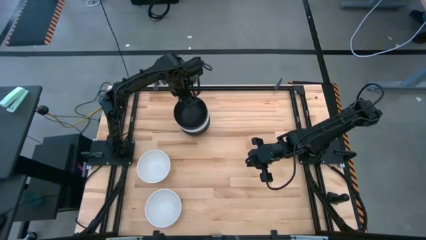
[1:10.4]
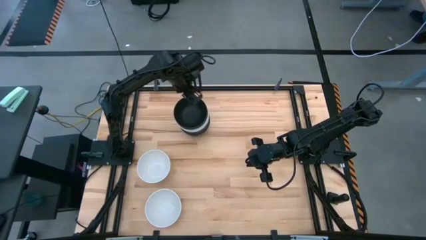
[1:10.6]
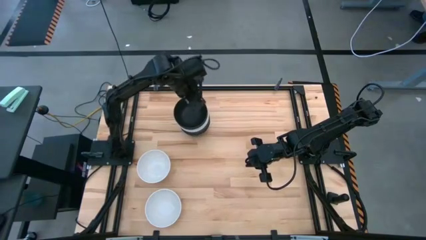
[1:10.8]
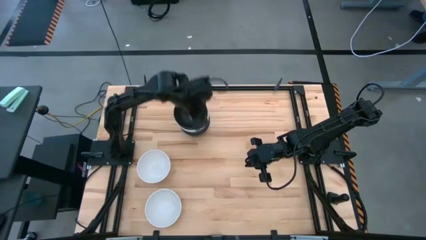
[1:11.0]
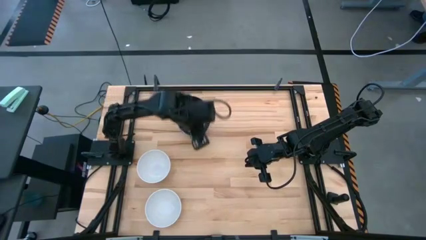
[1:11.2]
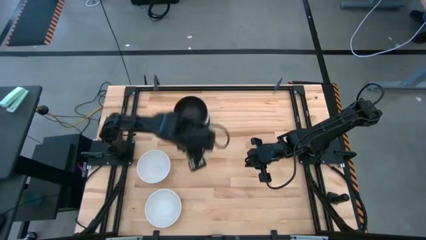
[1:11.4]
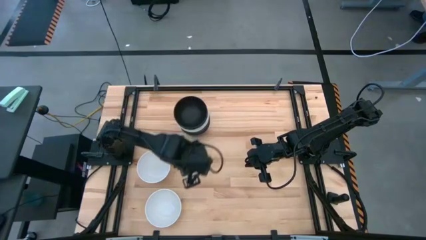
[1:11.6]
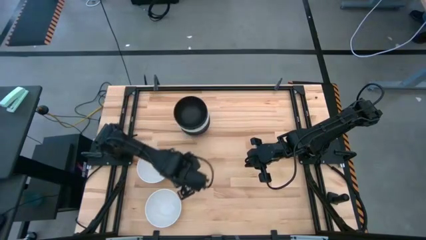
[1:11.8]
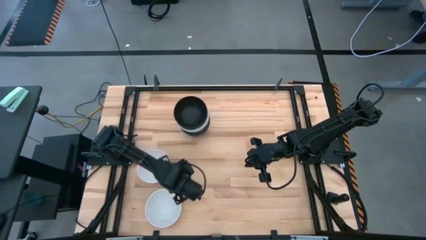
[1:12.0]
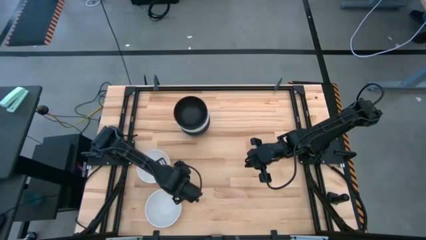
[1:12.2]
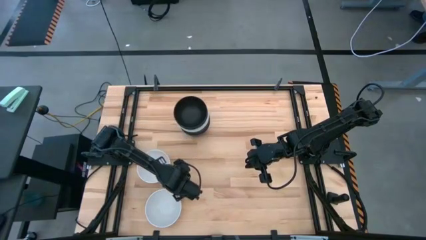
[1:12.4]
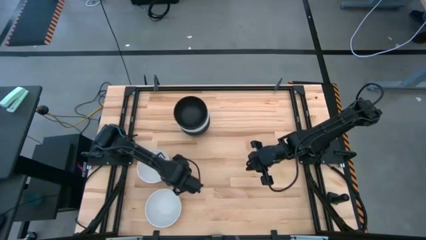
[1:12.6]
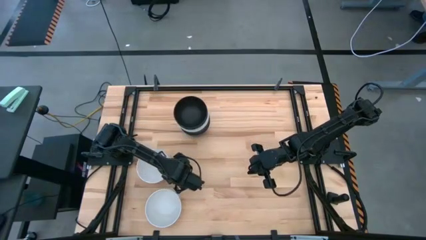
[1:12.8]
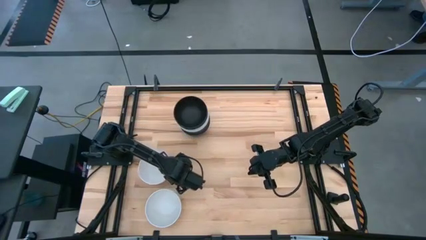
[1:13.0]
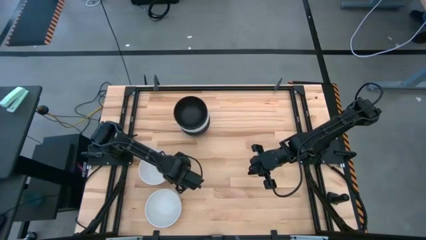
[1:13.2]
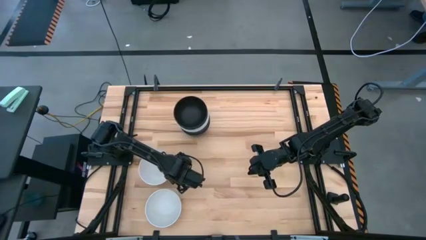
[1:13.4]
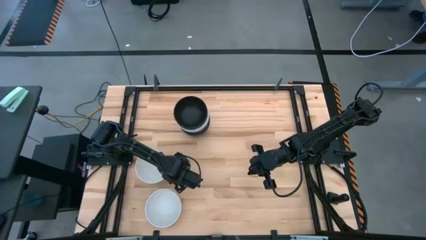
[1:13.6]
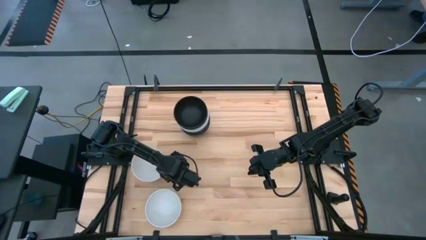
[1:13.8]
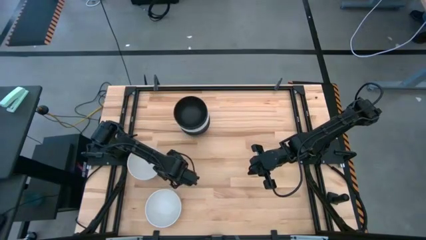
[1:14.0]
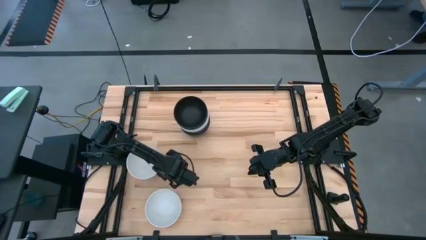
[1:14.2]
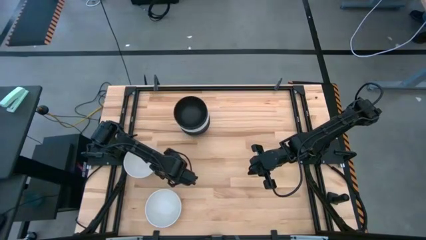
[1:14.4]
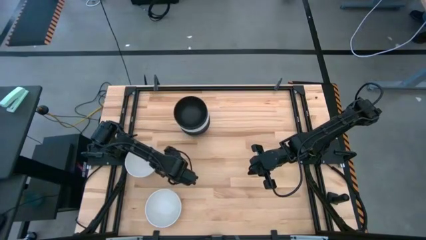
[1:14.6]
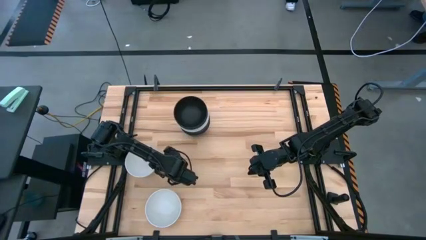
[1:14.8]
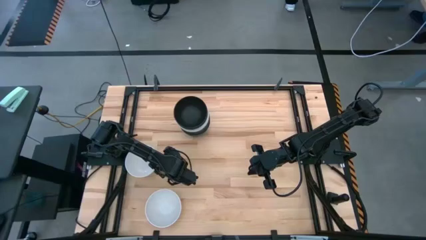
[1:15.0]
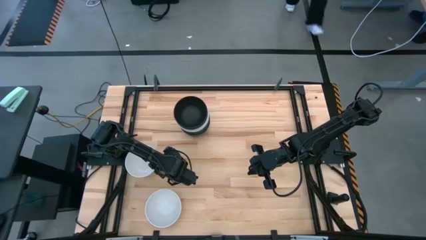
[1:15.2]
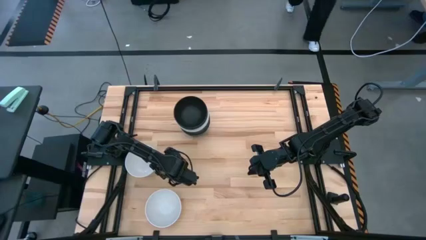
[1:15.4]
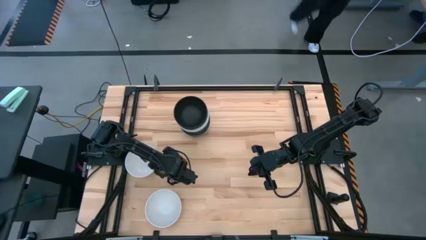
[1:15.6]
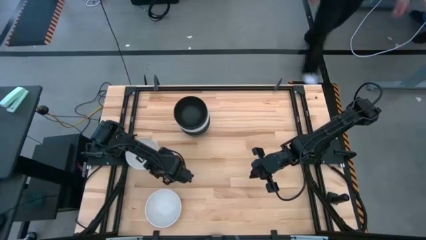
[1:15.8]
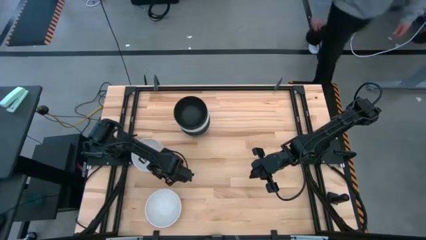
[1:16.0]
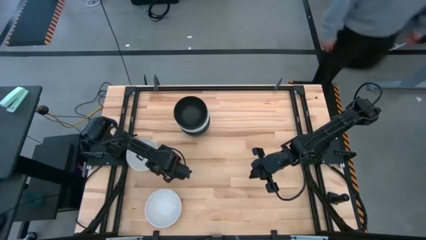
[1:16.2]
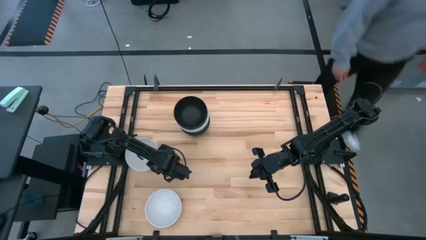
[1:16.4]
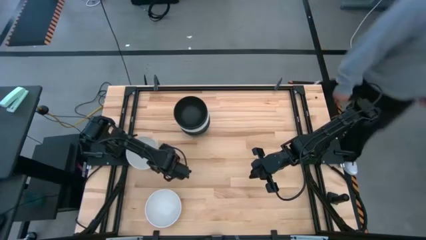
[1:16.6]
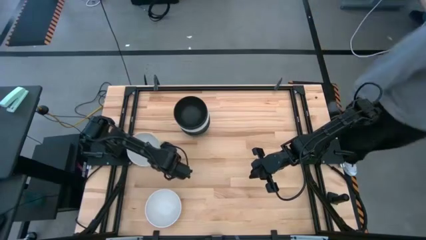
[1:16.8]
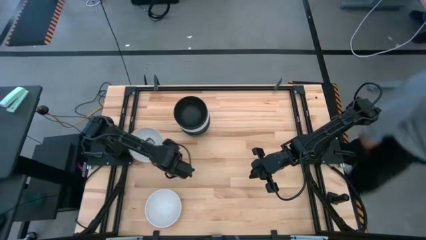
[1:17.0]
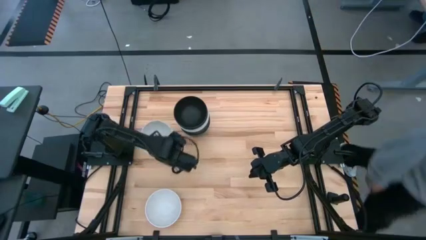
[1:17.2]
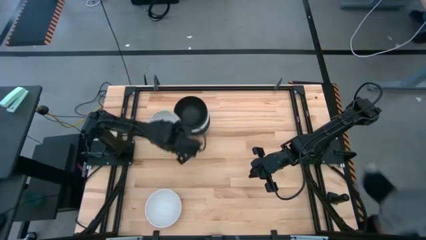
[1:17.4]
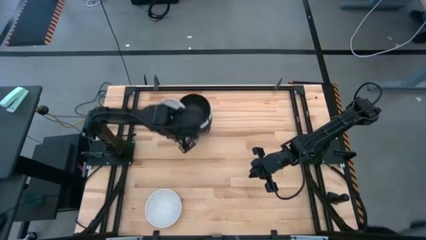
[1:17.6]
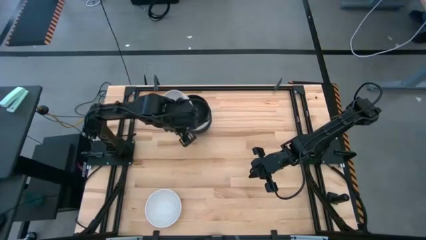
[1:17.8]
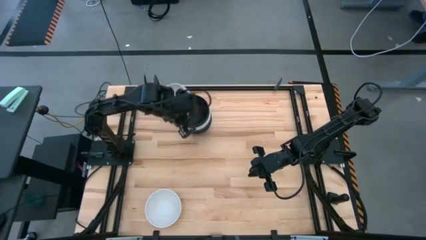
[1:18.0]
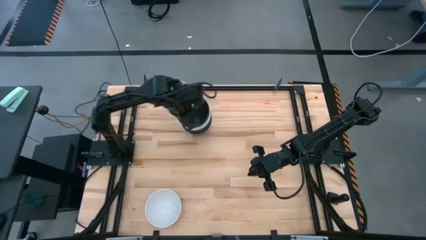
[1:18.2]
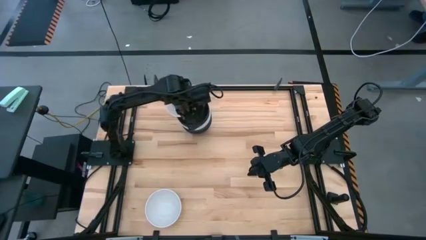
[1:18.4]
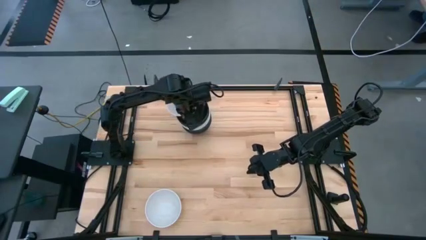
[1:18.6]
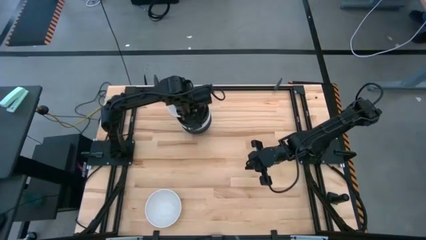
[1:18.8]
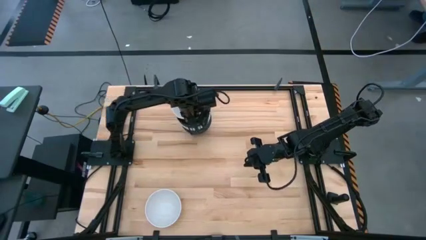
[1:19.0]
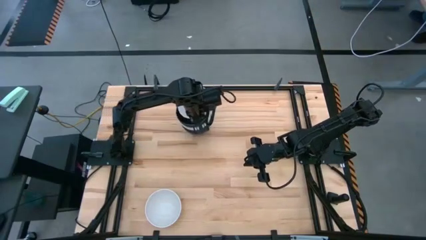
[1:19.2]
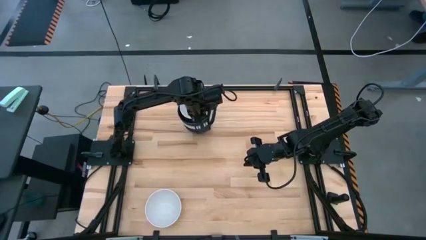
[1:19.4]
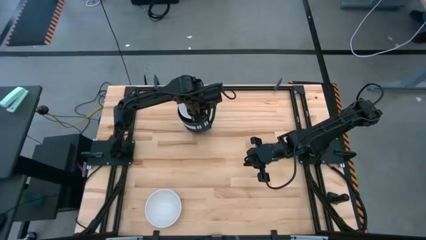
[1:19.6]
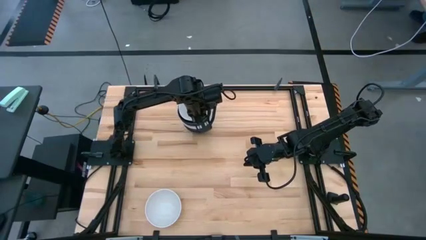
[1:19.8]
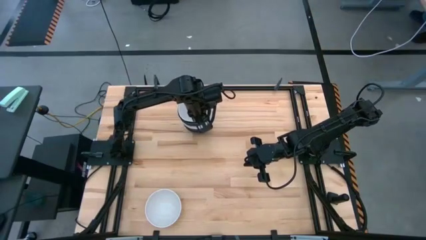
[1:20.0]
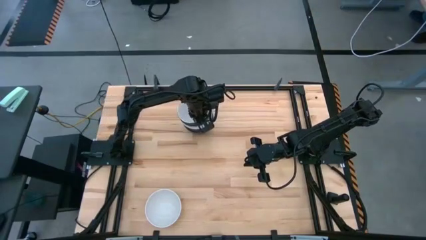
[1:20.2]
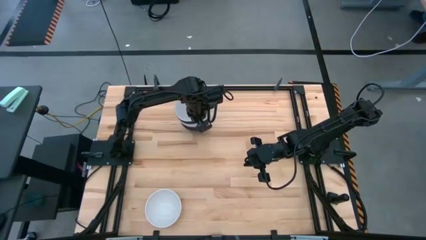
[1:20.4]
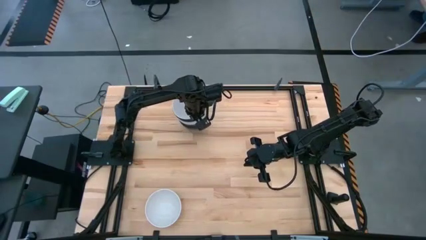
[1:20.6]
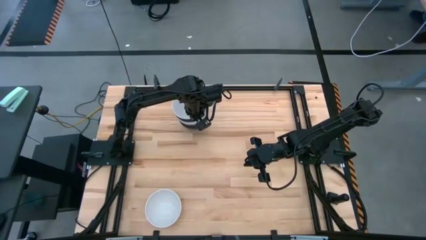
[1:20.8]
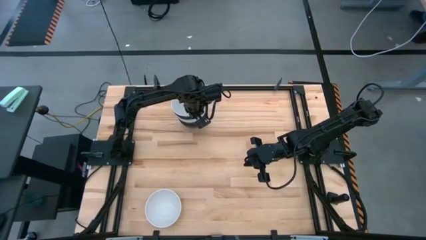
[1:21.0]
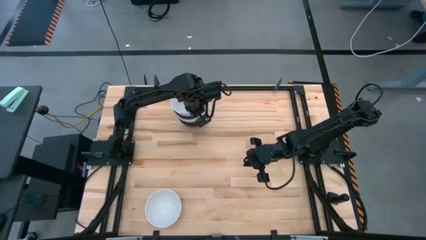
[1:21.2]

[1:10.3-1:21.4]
Task: Nest bowls inside each other
Stack the white bowl on top of the stacked black bowls

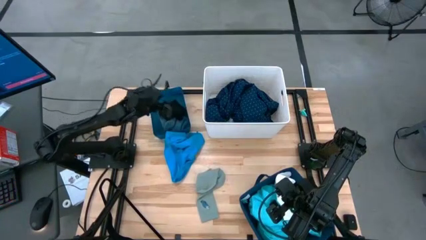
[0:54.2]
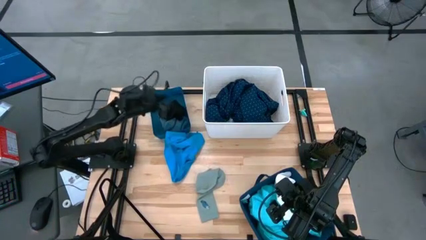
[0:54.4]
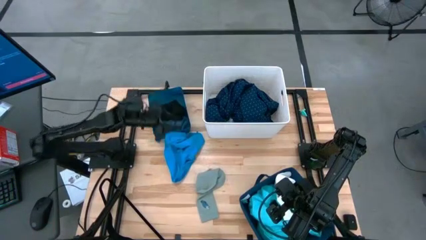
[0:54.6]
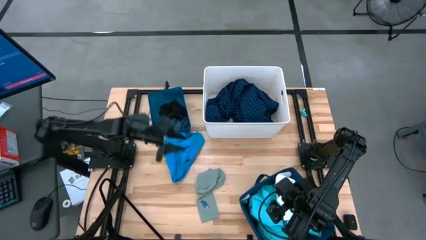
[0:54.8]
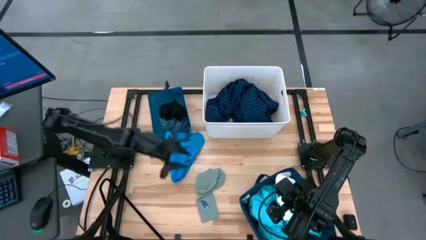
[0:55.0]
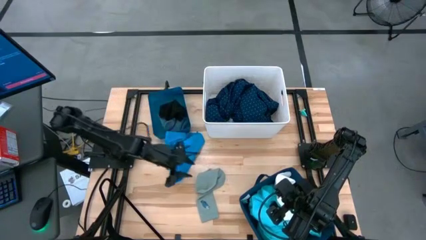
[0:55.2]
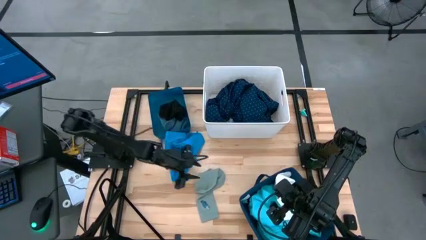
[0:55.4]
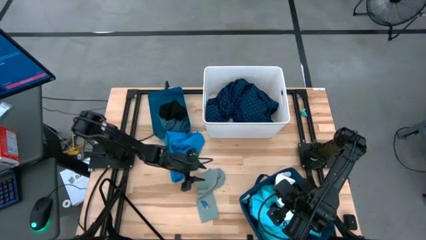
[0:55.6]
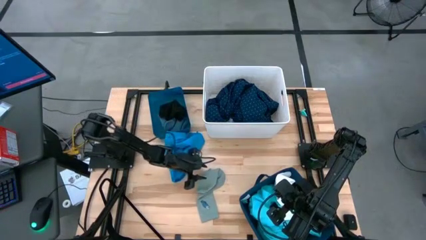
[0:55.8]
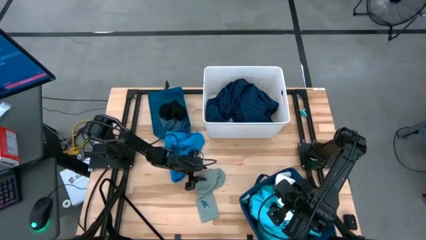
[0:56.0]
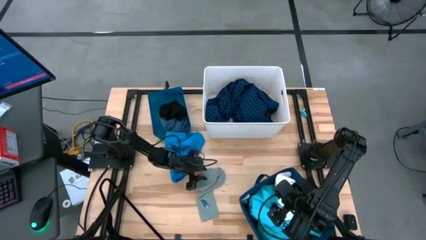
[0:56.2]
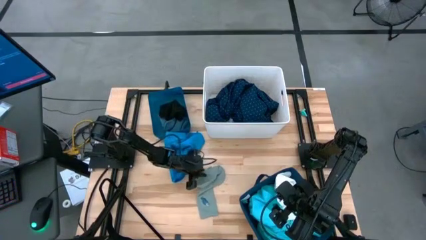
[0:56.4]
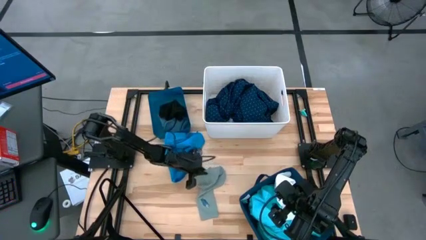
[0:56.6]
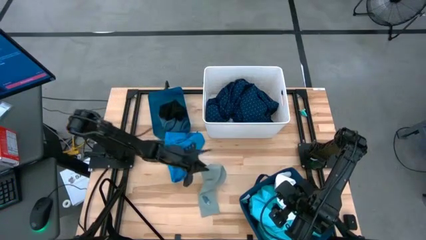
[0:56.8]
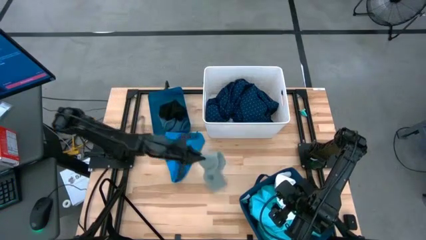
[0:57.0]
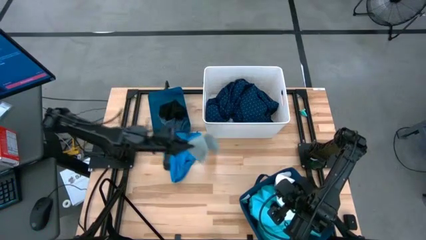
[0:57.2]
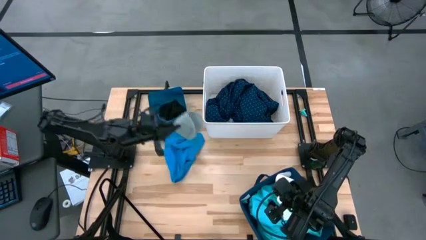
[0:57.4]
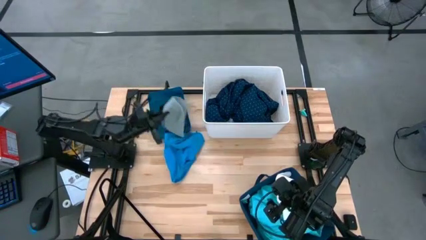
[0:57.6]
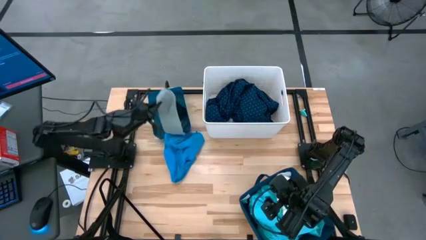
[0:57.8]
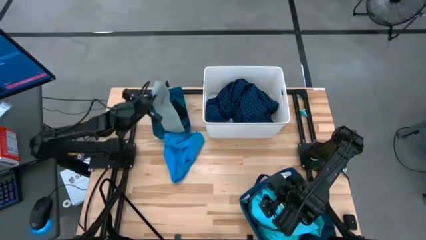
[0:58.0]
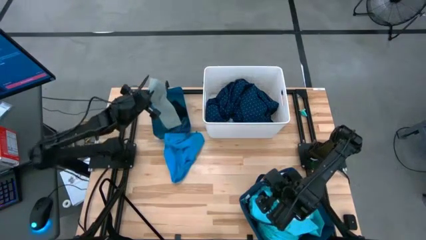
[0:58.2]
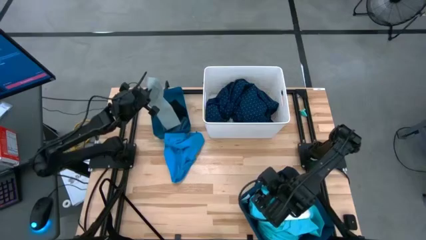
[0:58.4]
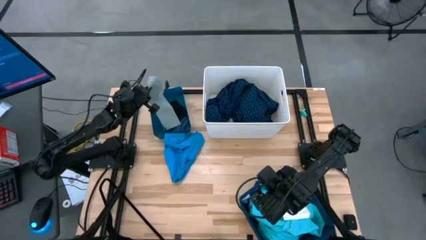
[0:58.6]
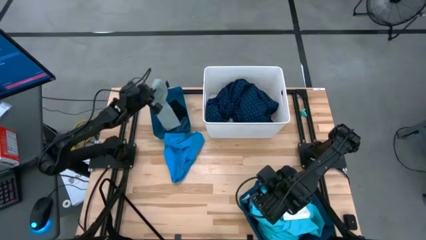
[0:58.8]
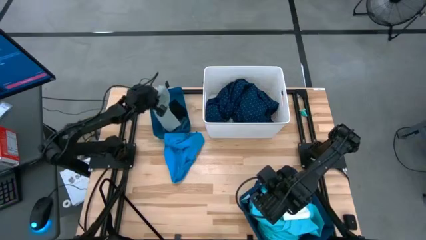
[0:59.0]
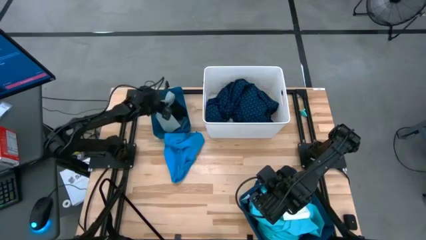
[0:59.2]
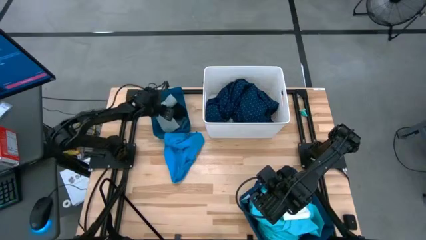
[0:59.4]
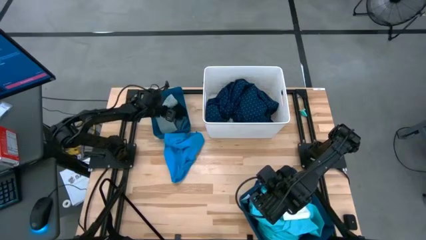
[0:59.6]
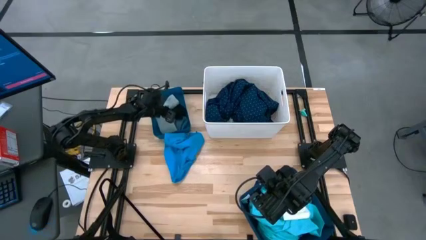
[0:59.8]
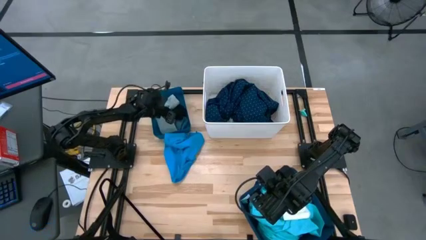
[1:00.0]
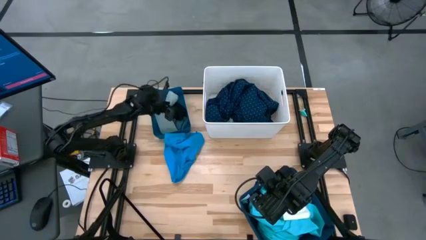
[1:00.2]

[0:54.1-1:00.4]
Task: Pick & Place Cloths
Put the gray sock into the blue bin
